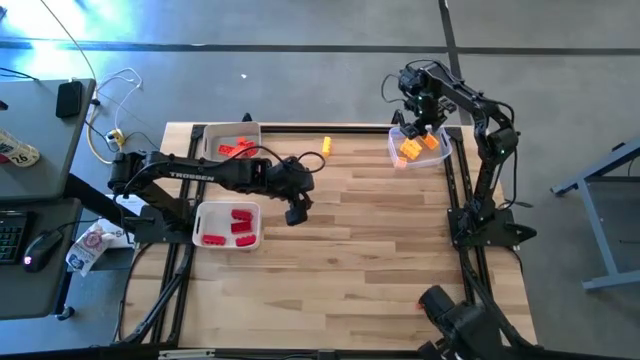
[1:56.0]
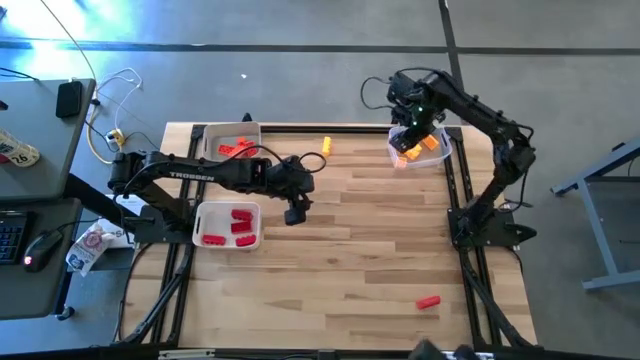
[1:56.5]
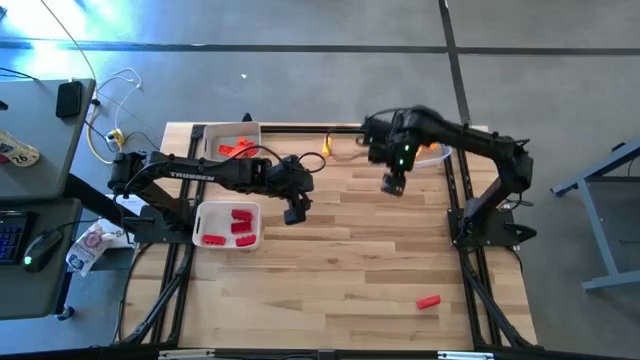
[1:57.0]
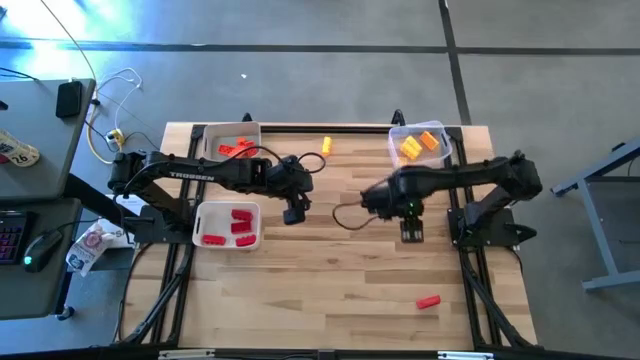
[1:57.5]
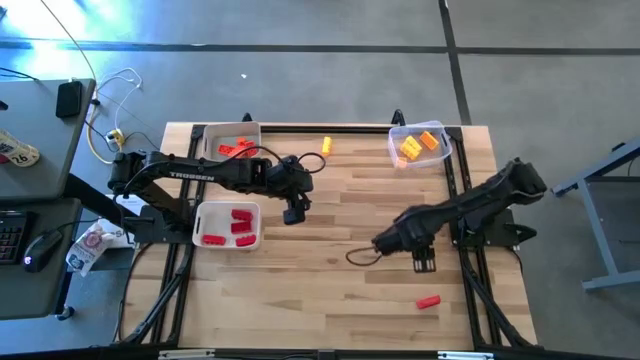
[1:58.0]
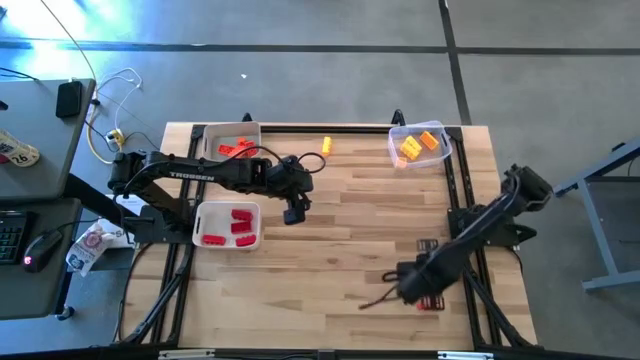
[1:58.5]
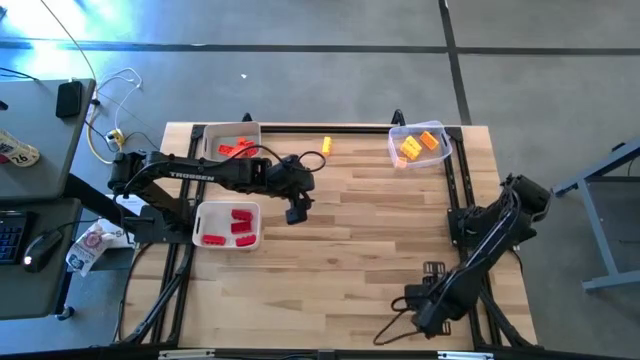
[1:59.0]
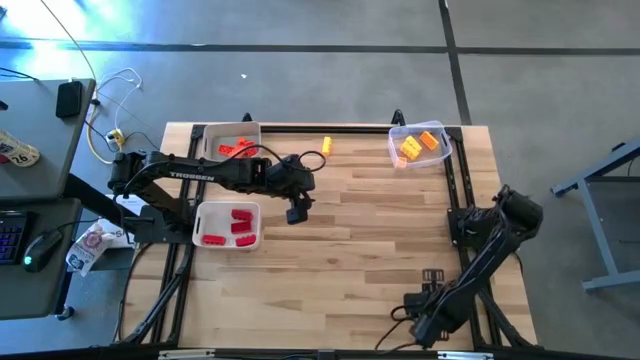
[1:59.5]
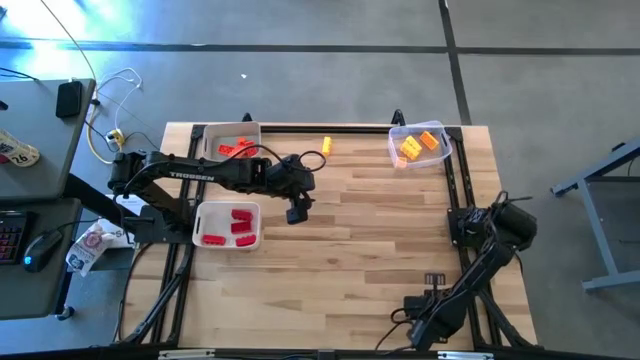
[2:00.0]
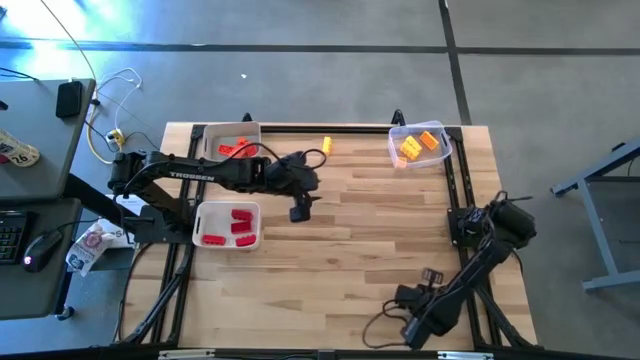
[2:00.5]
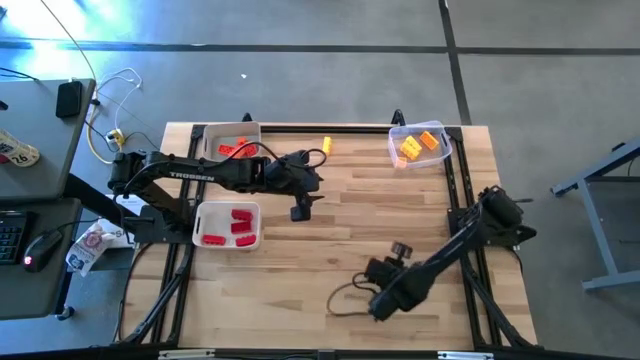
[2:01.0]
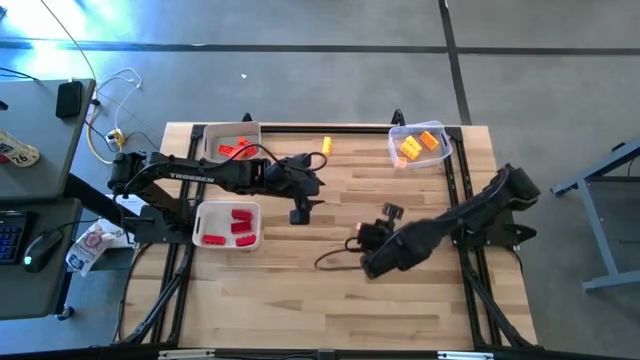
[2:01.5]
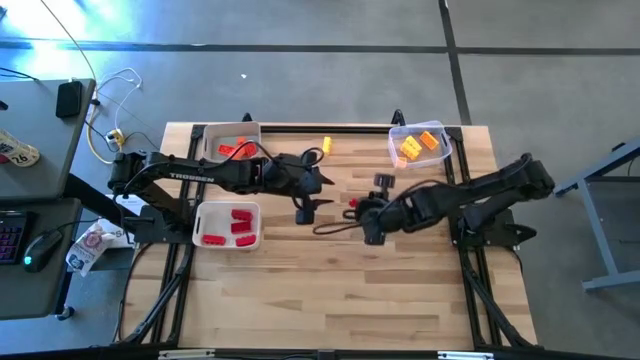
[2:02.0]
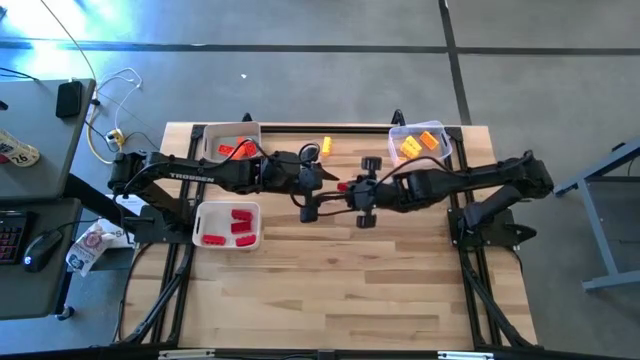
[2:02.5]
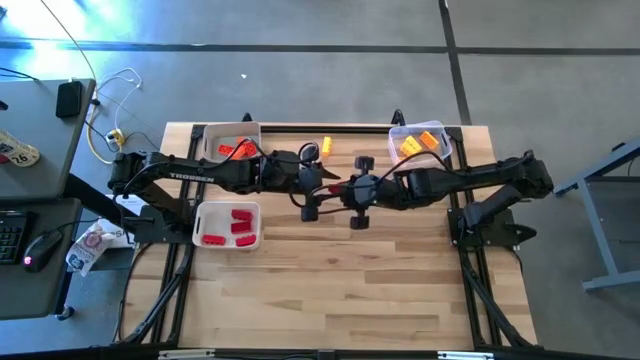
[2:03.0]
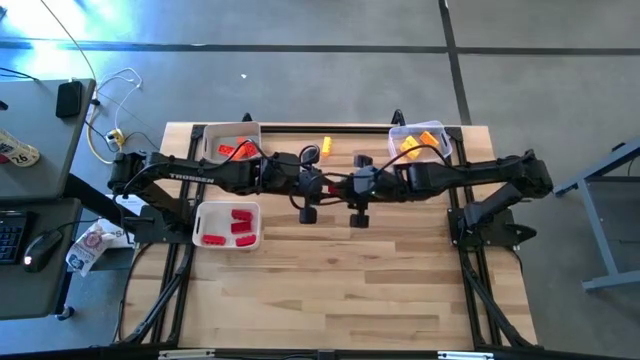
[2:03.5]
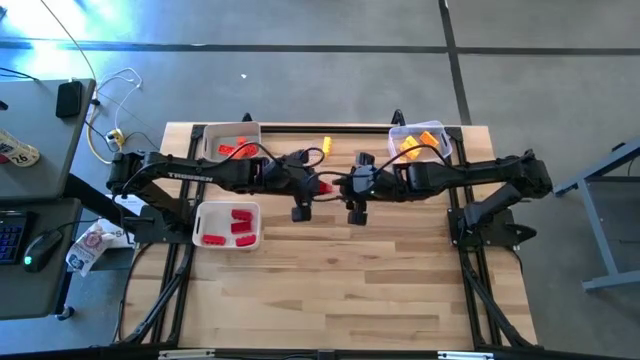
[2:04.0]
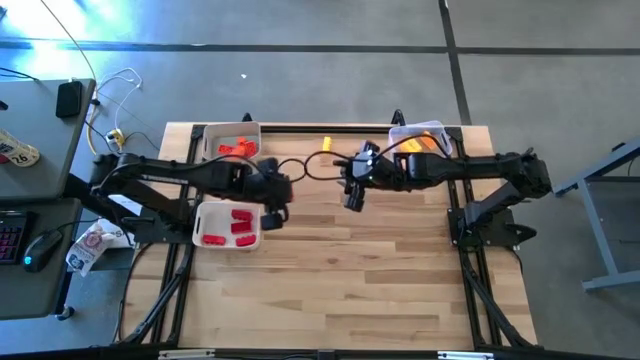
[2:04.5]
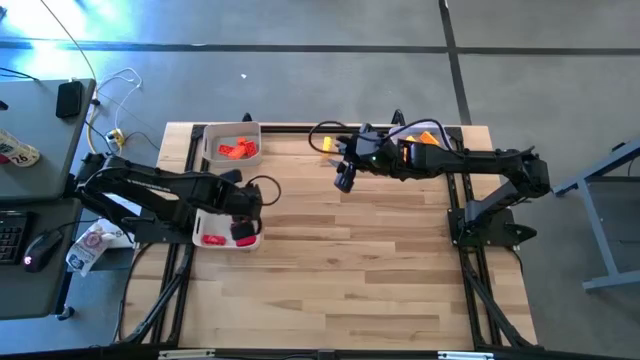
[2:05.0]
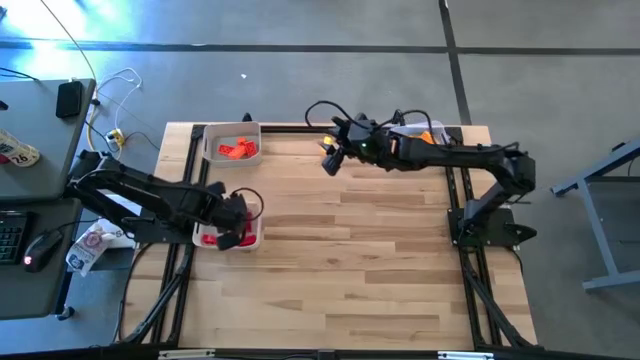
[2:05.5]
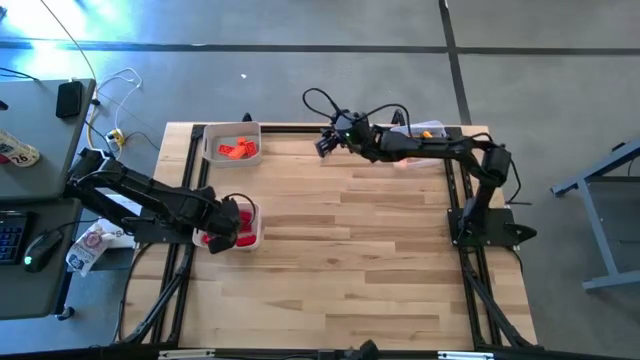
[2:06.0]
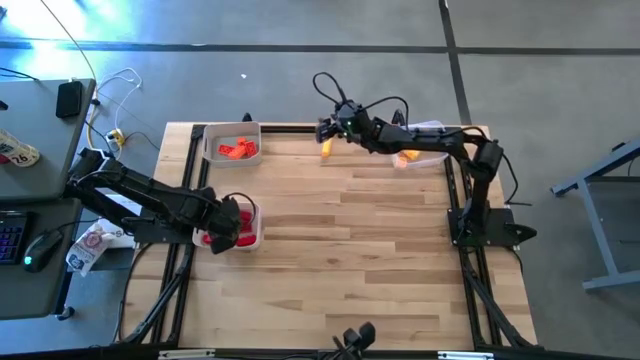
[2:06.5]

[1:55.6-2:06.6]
Task: Sort & place blocks by color
Put the red game piece into the white bin

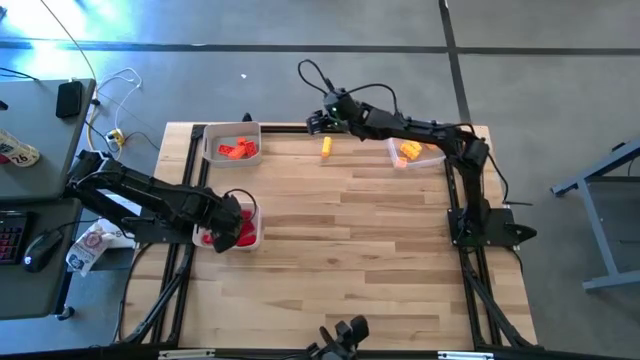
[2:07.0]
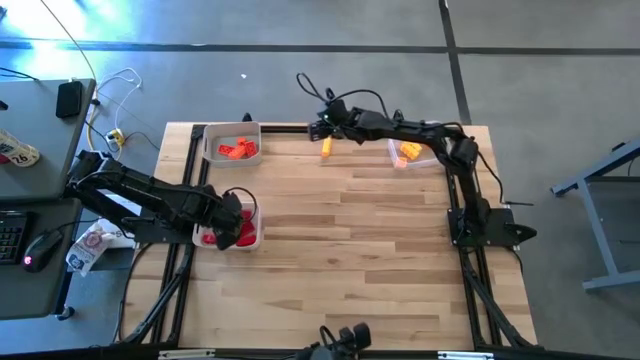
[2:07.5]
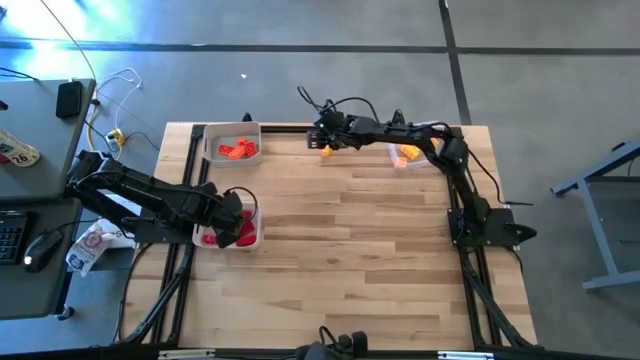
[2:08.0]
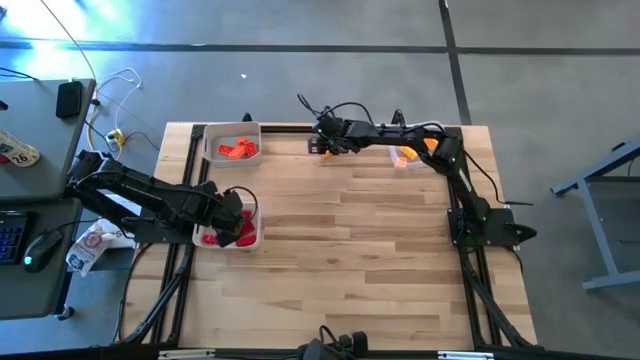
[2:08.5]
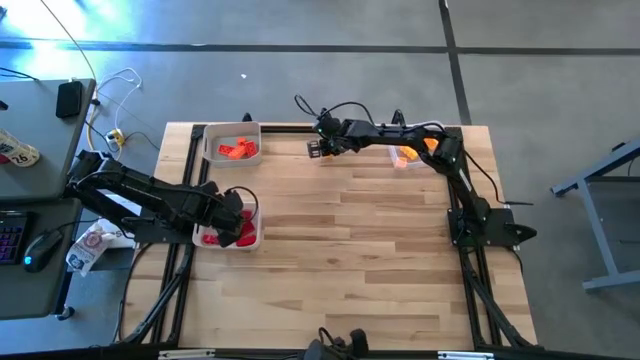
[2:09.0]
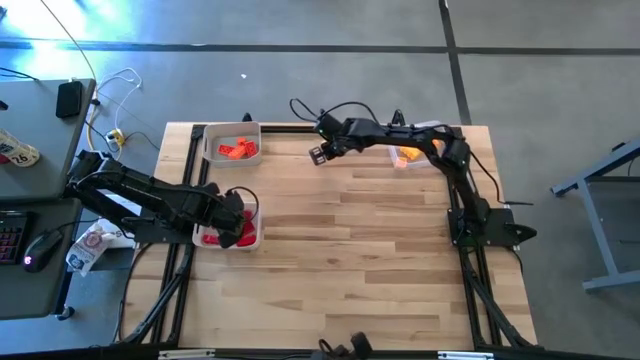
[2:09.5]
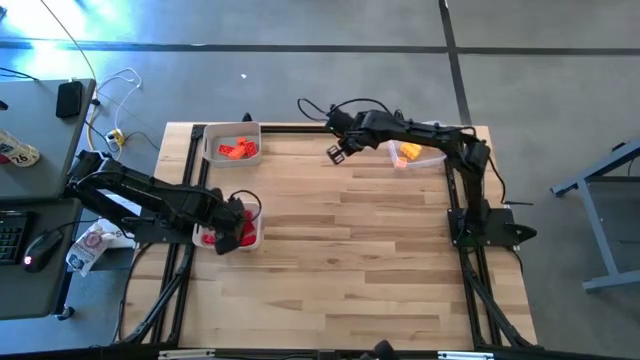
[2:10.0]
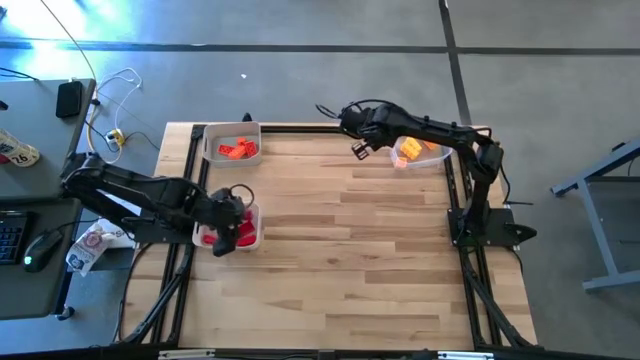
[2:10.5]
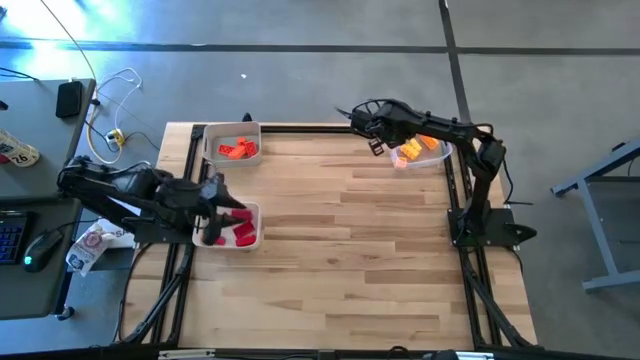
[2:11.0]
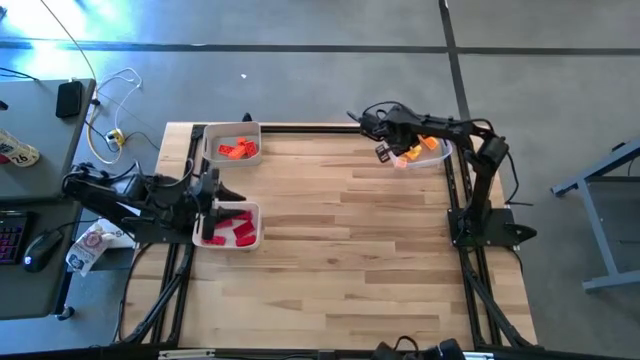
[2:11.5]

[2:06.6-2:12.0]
Put the yellow game piece into the transparent bin

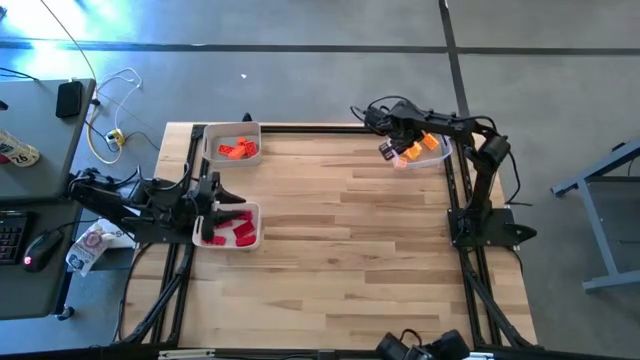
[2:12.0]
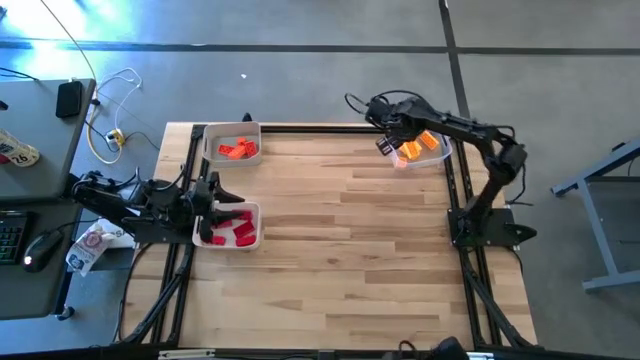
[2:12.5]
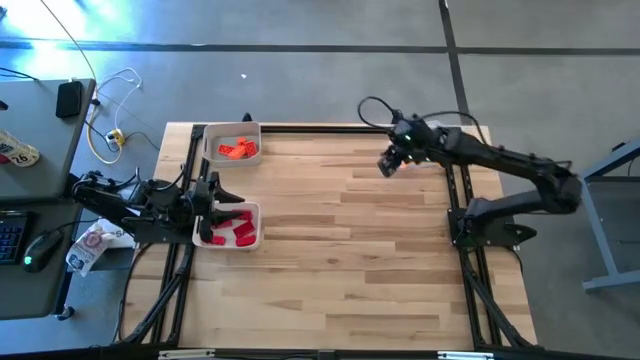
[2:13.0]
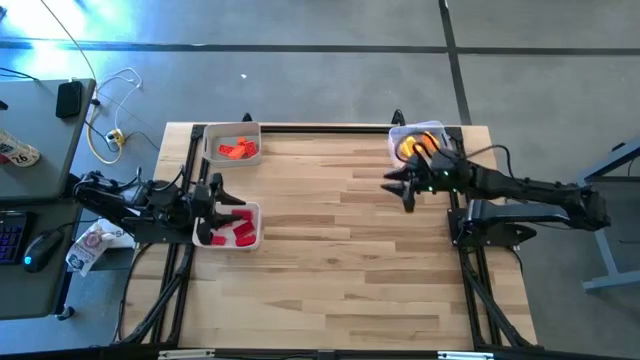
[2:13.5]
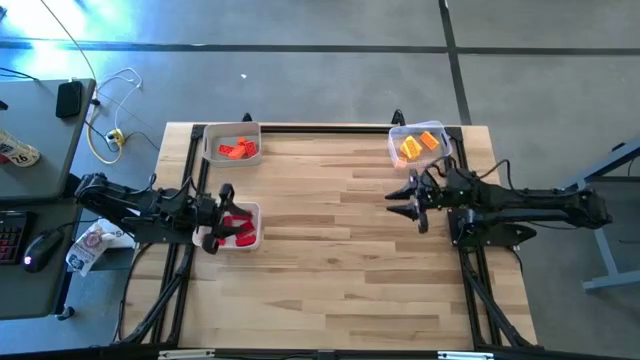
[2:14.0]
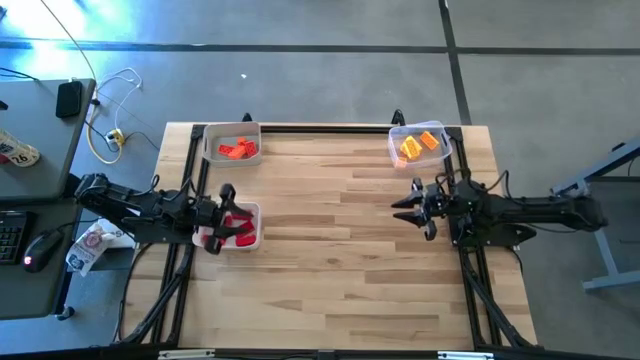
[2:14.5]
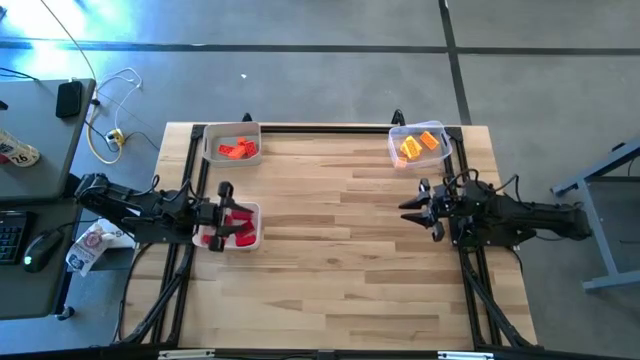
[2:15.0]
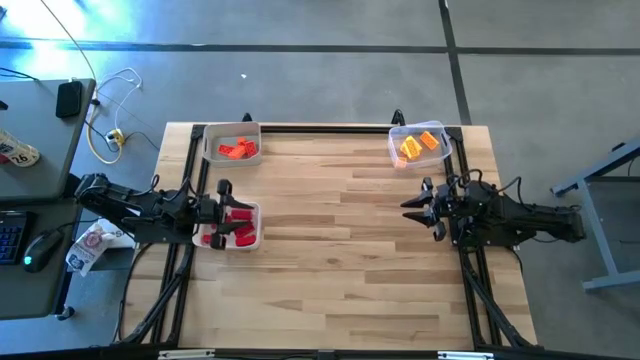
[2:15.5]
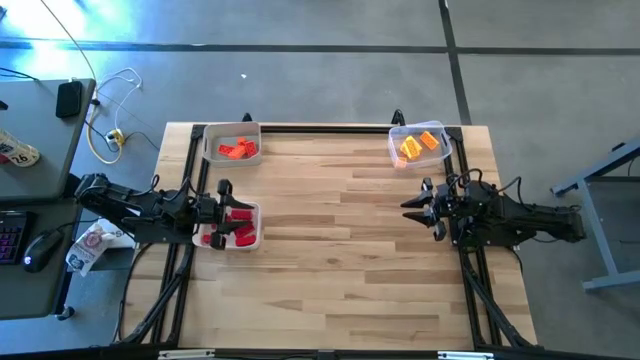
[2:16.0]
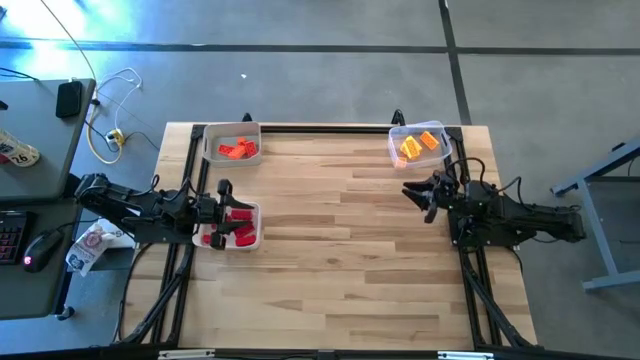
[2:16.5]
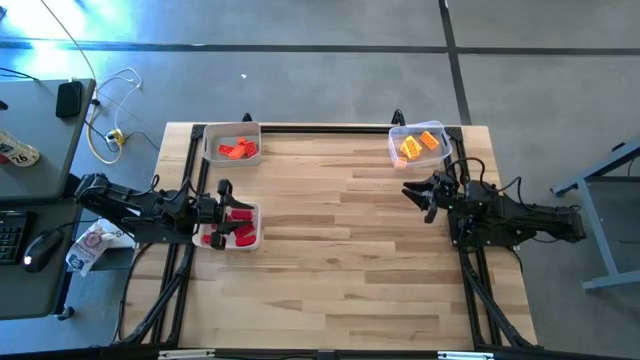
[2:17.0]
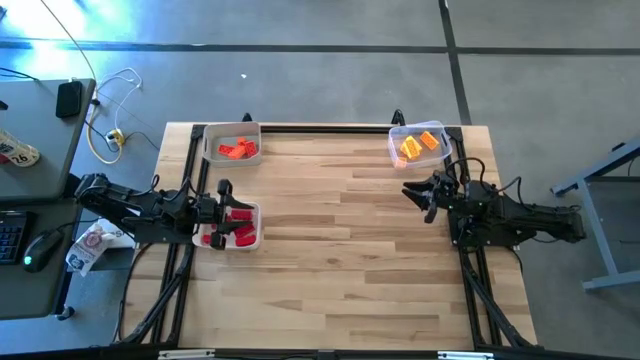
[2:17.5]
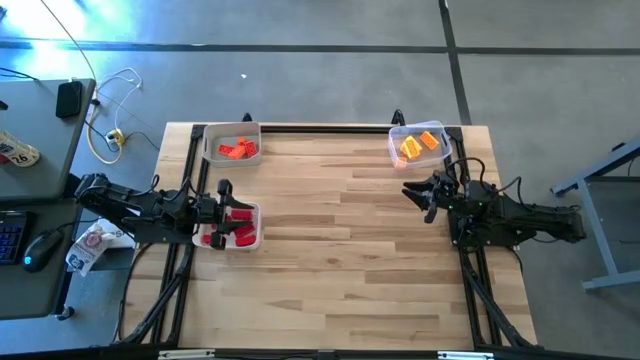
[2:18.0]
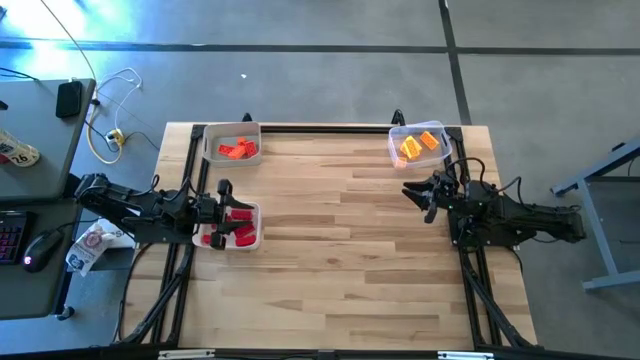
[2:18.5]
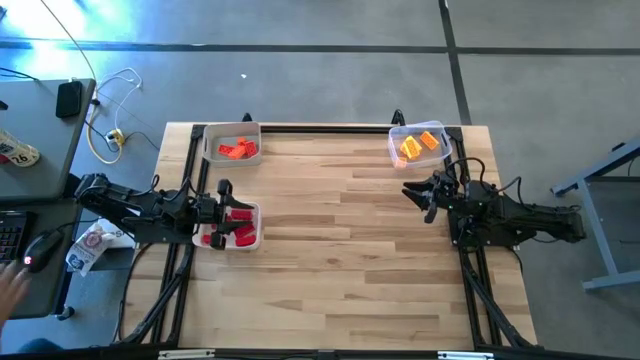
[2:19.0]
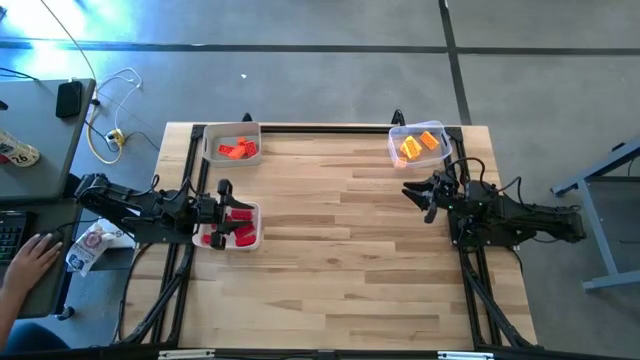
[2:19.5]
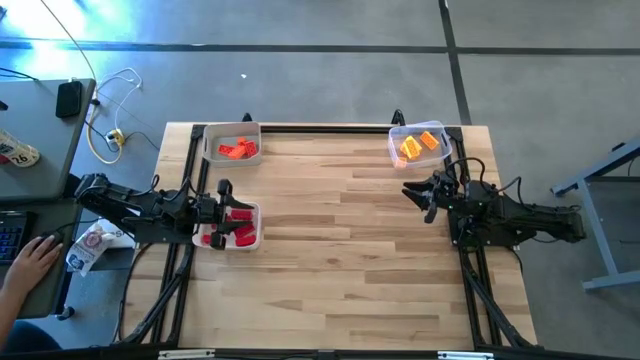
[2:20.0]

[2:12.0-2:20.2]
Return to Home Position
